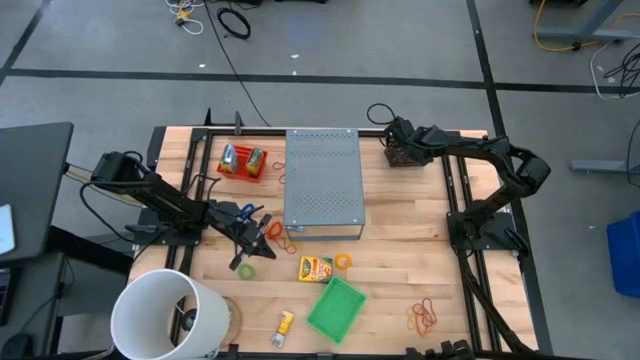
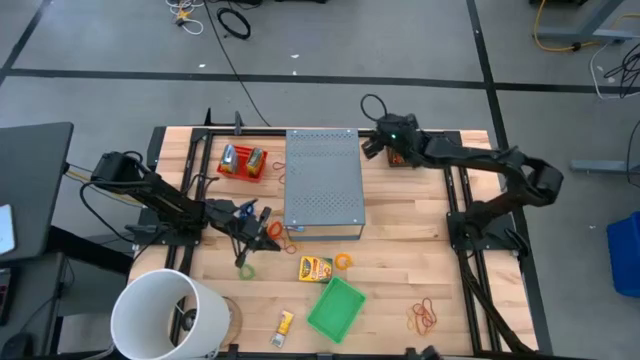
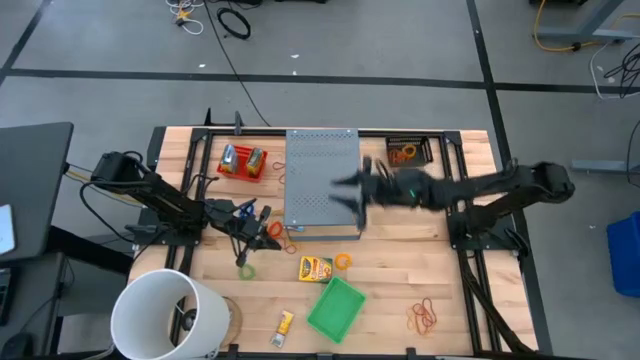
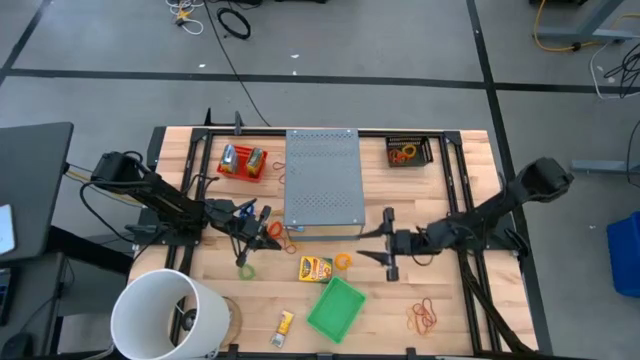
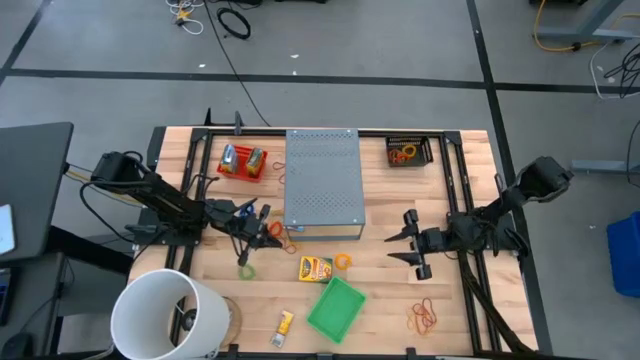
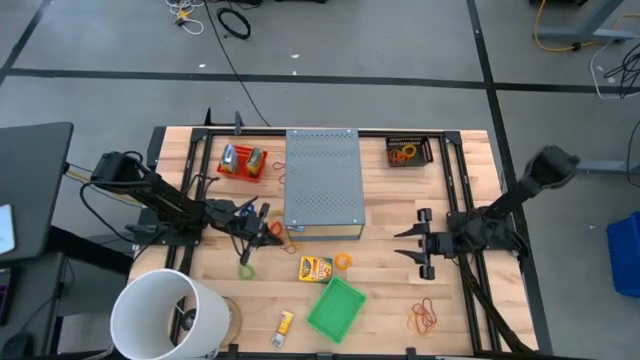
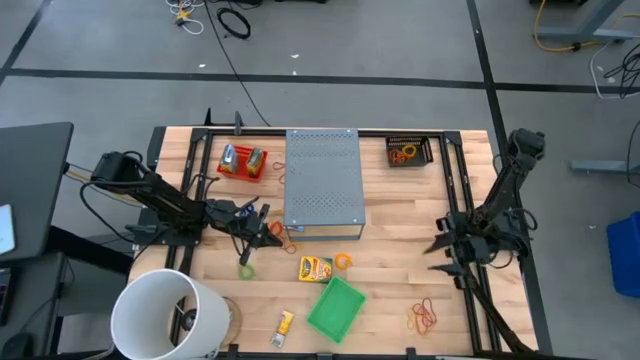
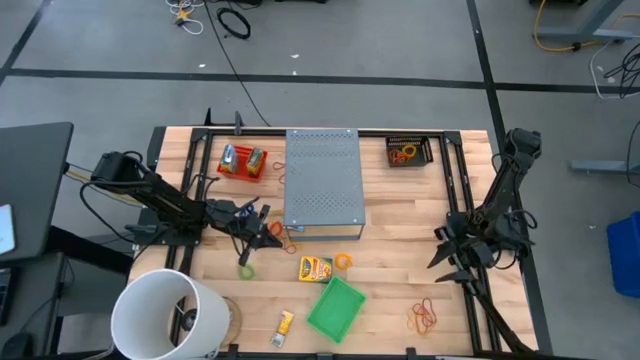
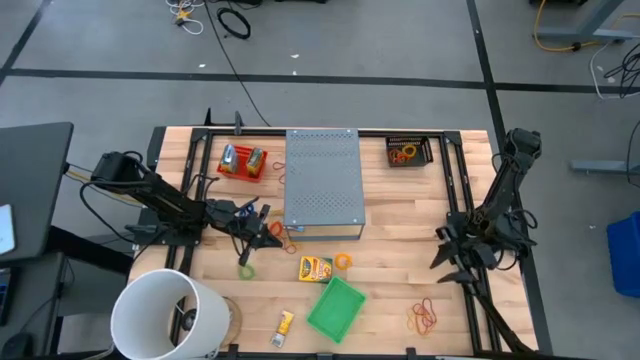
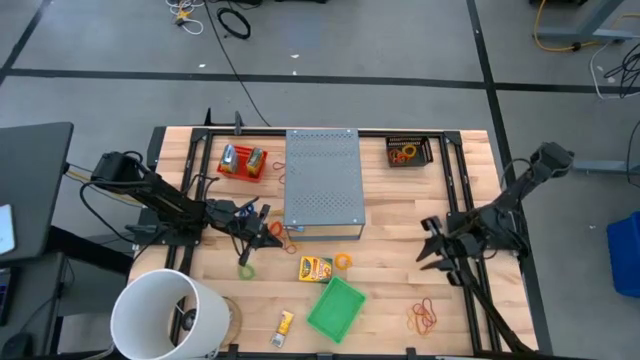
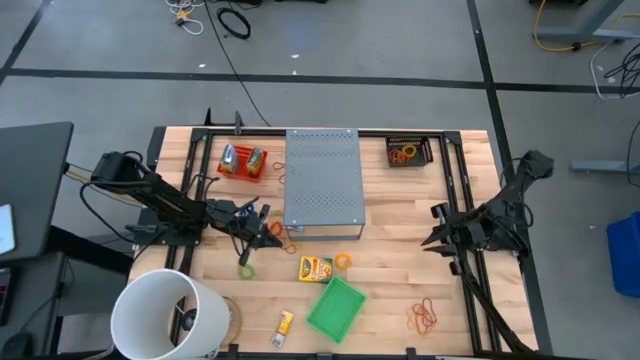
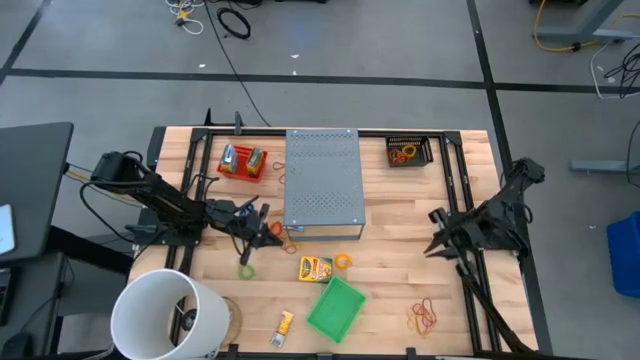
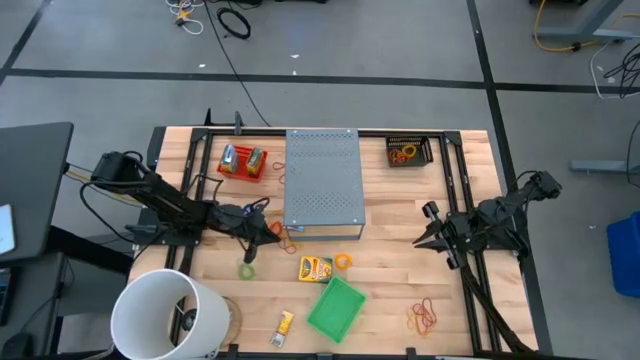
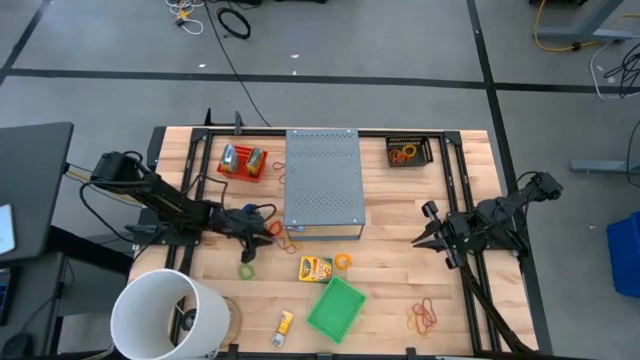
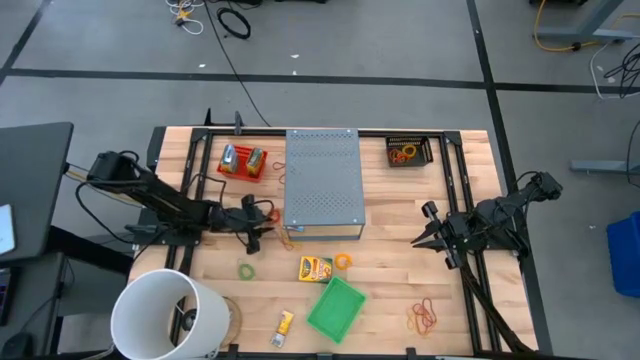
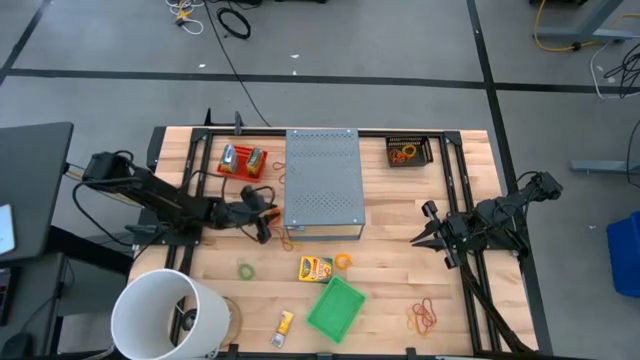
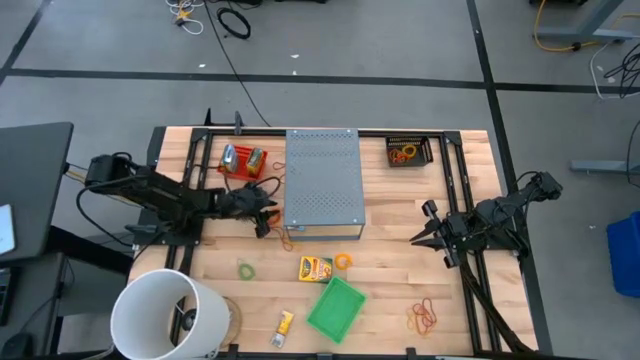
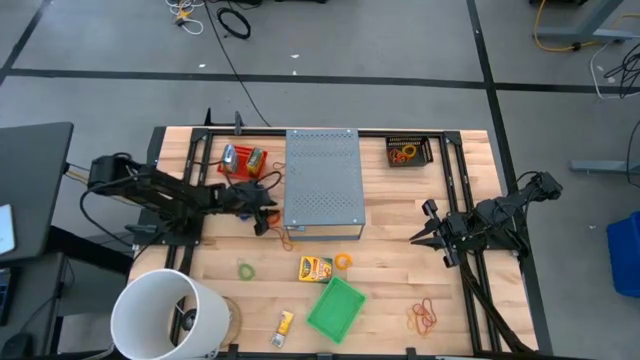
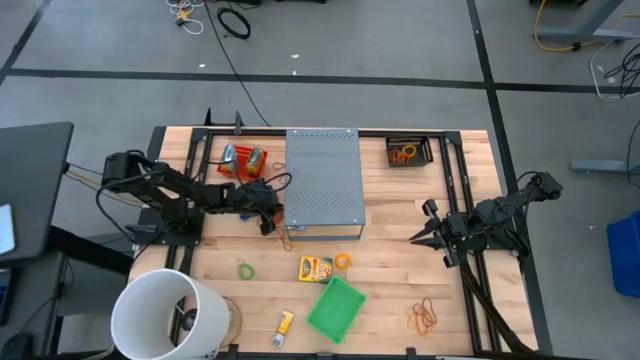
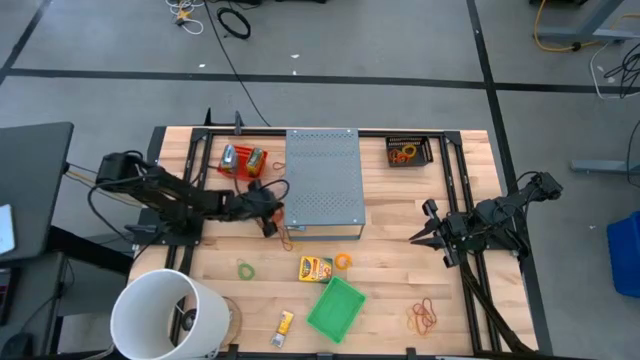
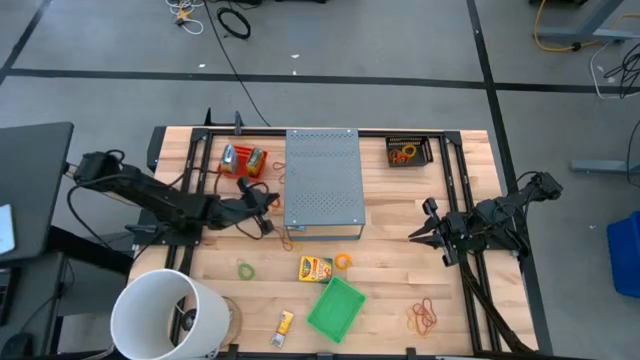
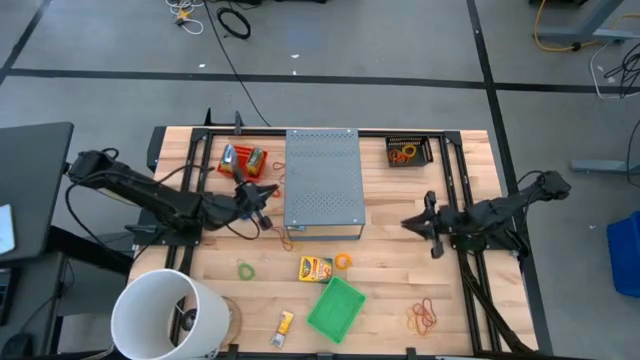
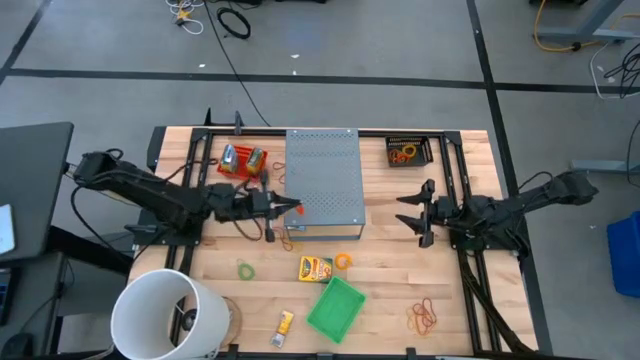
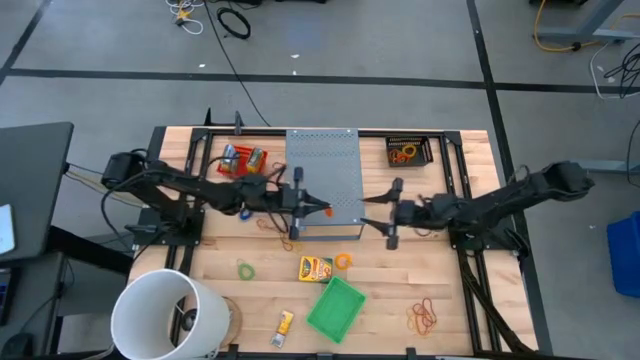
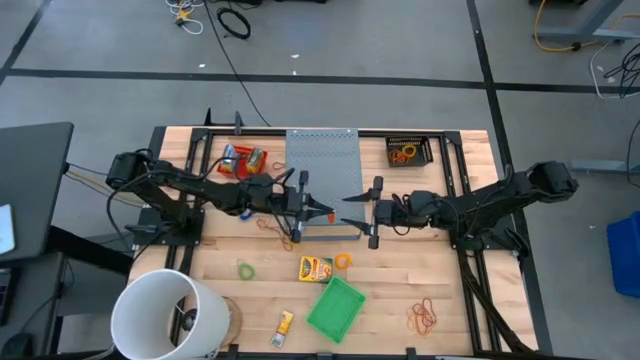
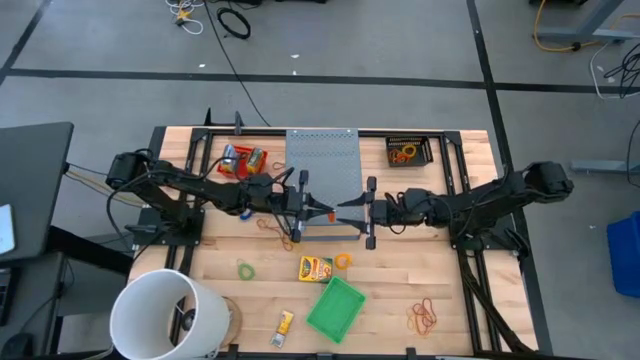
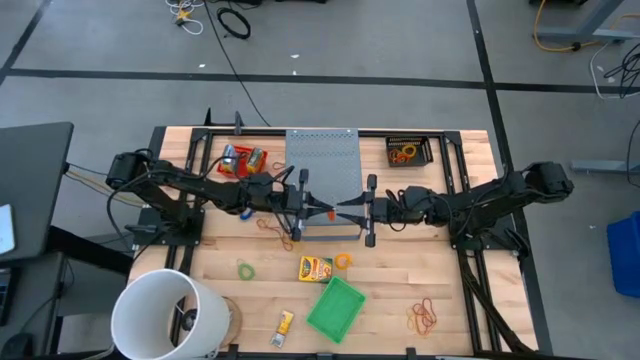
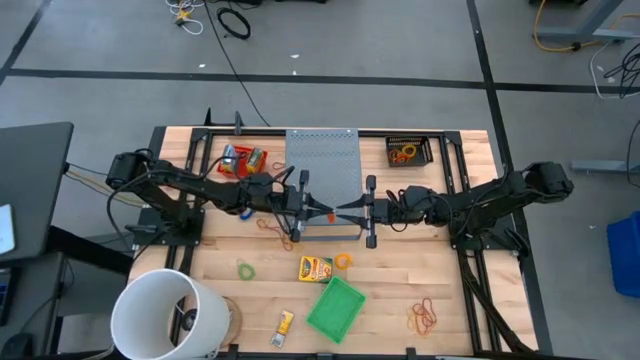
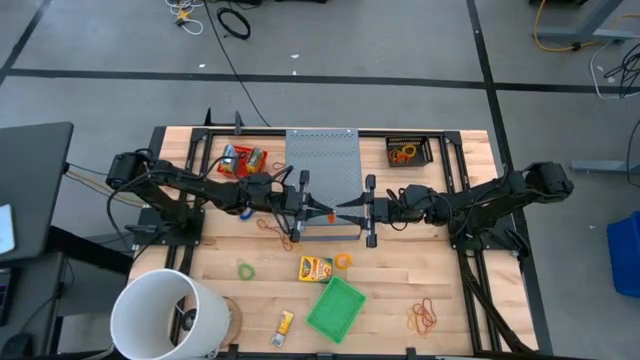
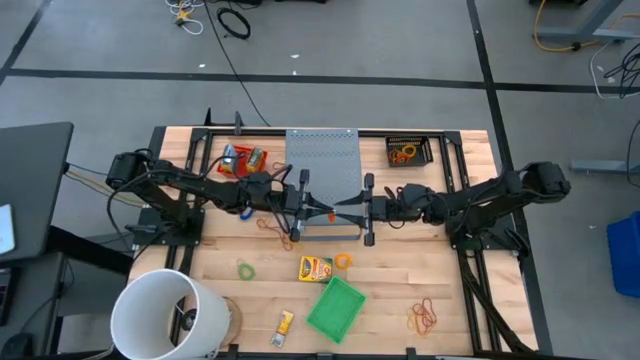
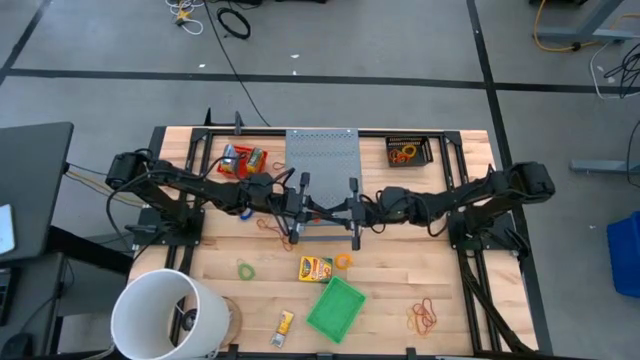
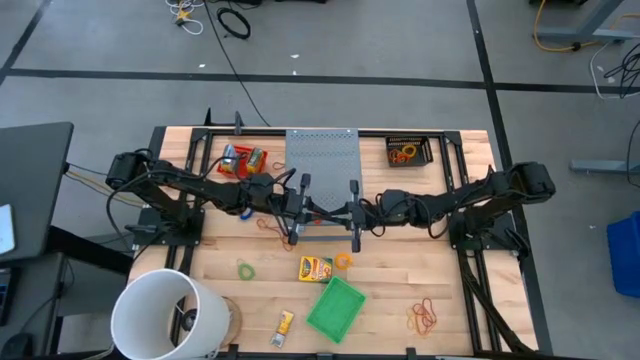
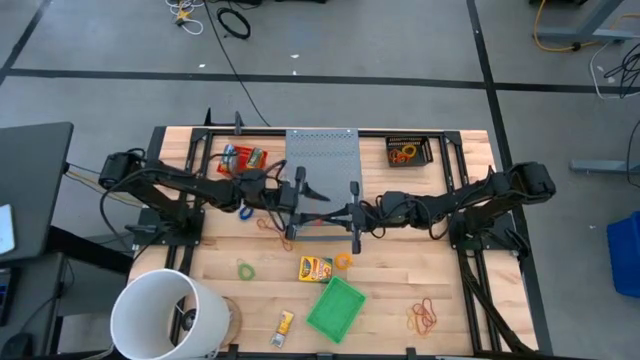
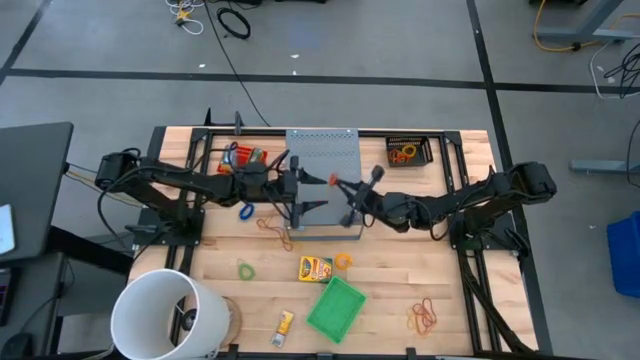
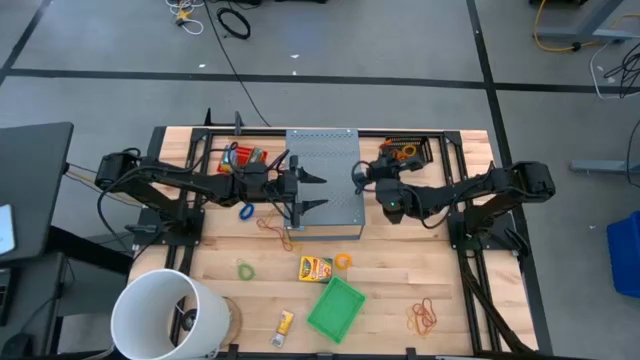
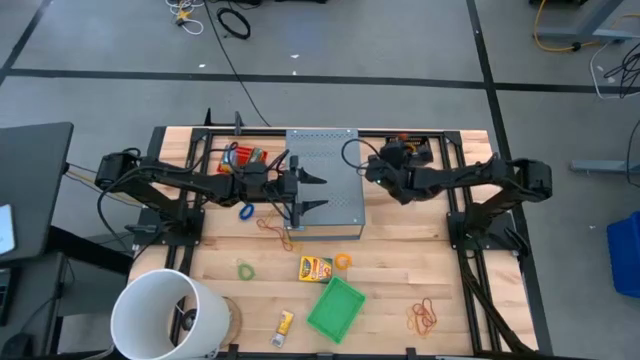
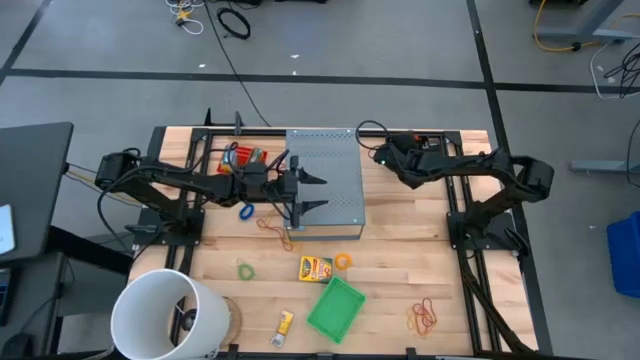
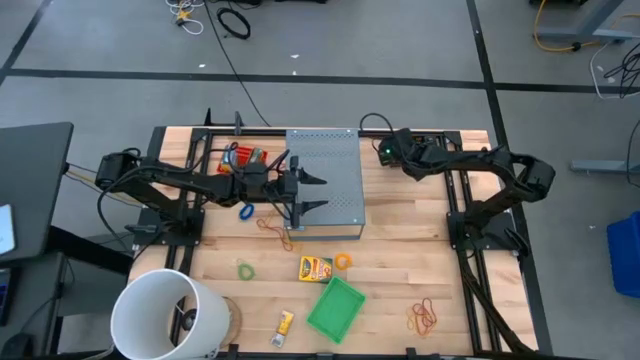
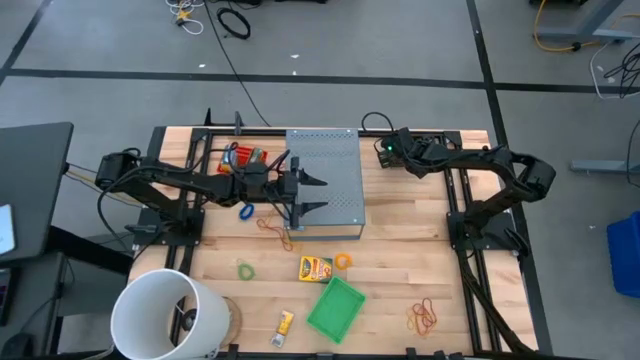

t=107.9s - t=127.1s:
Task: Pick & Place Office Desk Supplies
Put the orange spring keychain into the black basket

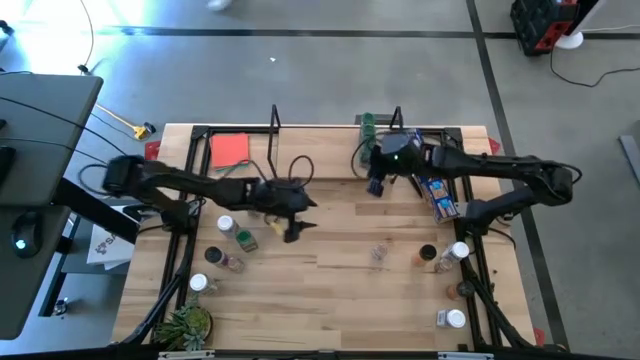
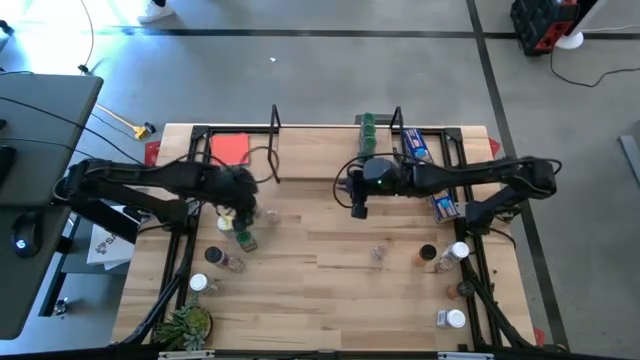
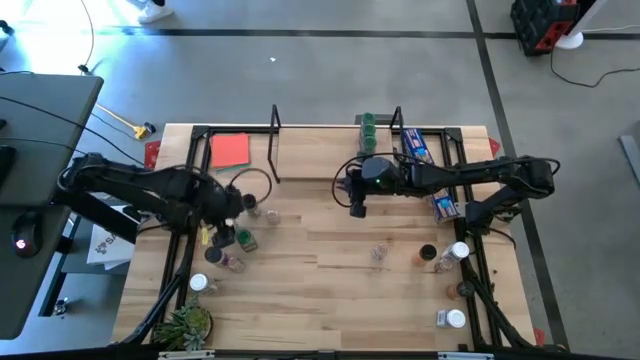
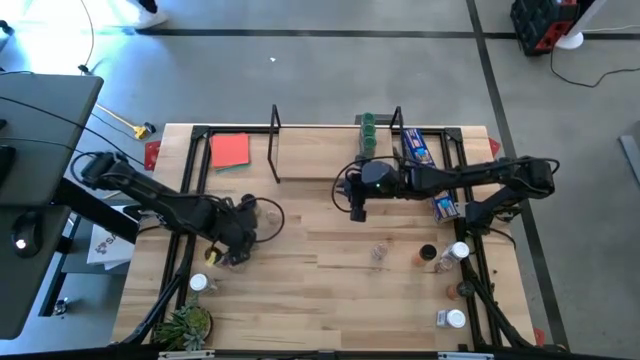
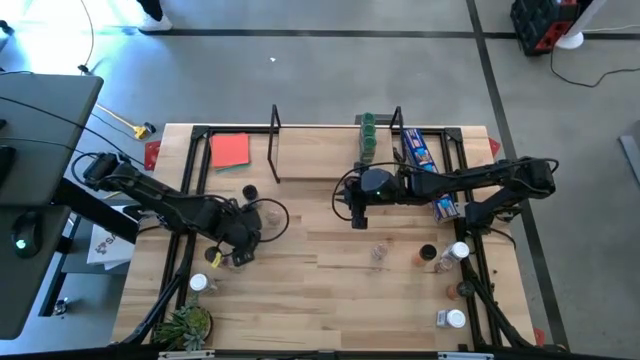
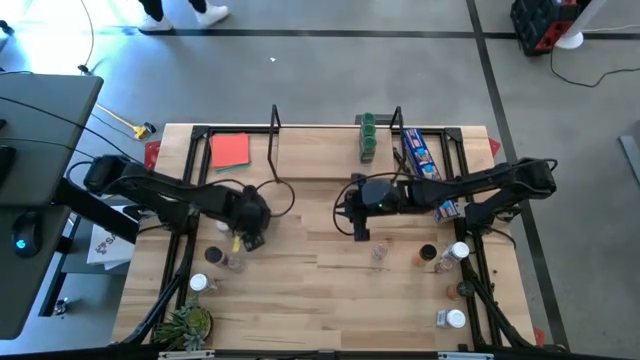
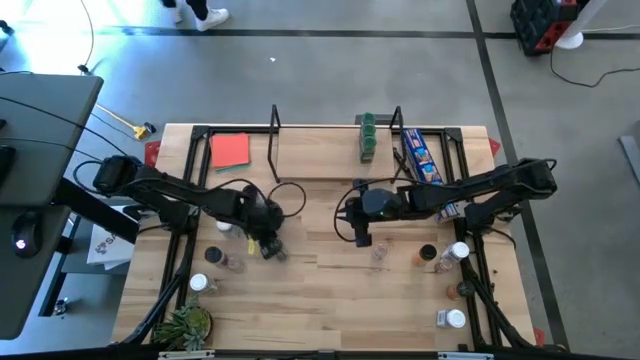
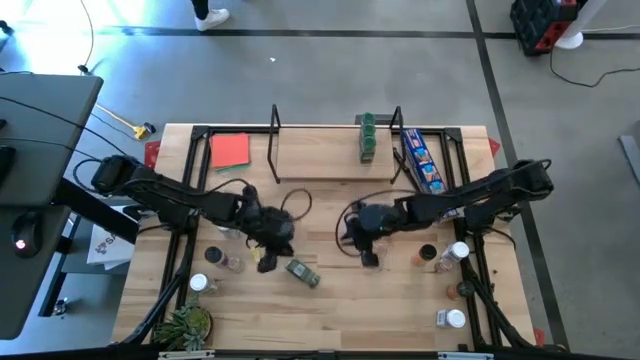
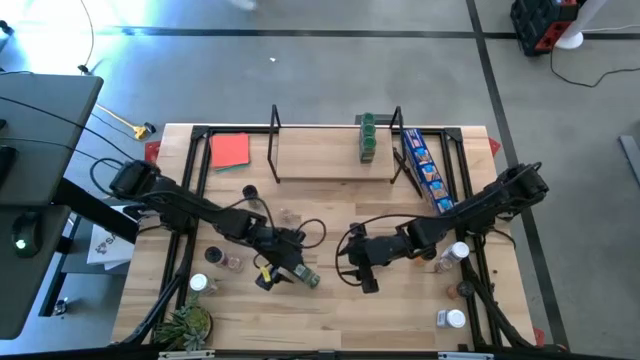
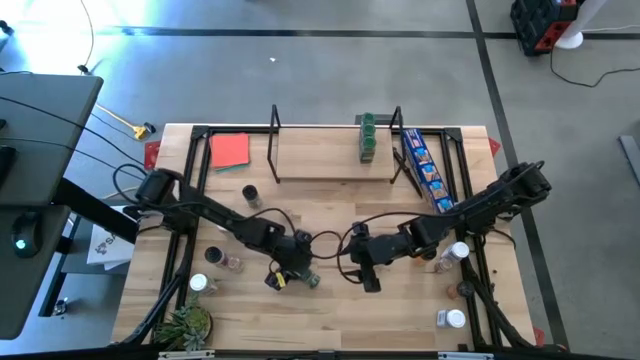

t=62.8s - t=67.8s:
Task: Shelf spices
Put the green seasoning bottle on the shelf aligned with the other green seasoning bottle
